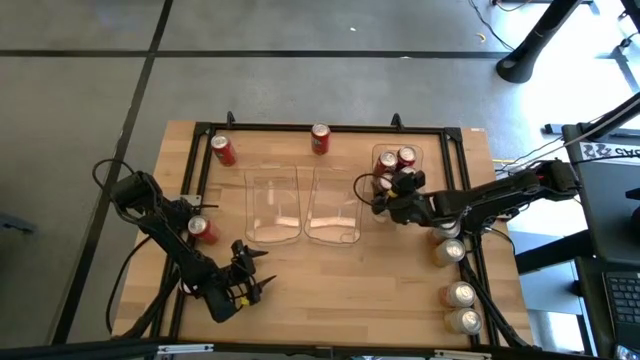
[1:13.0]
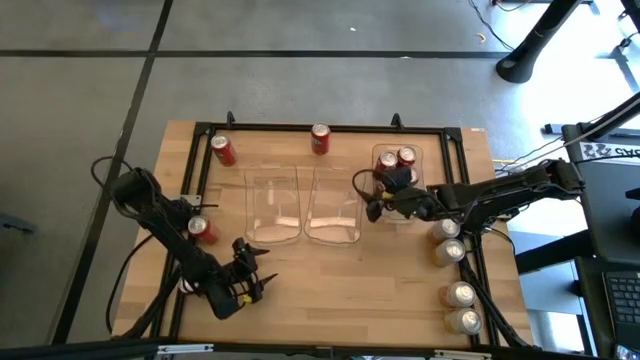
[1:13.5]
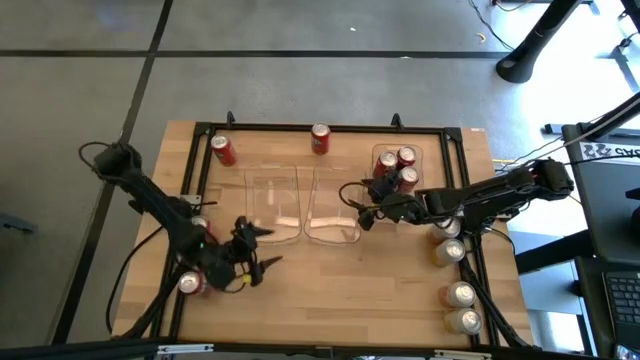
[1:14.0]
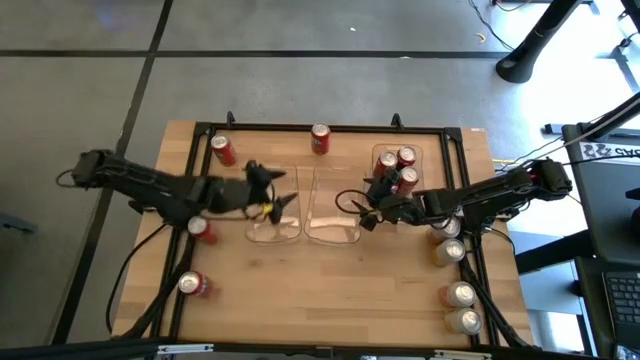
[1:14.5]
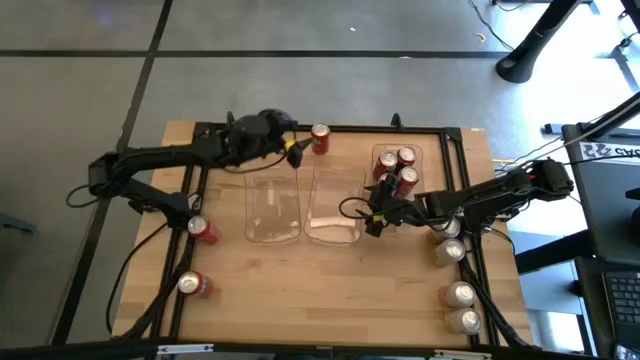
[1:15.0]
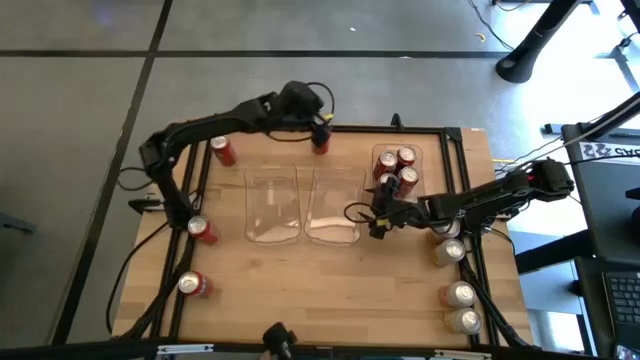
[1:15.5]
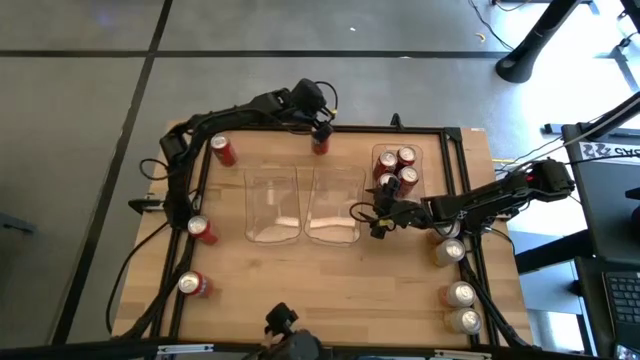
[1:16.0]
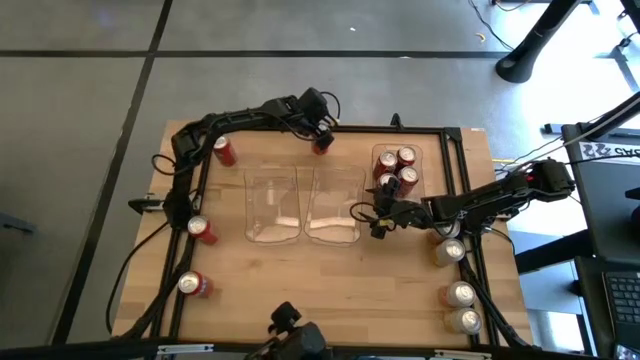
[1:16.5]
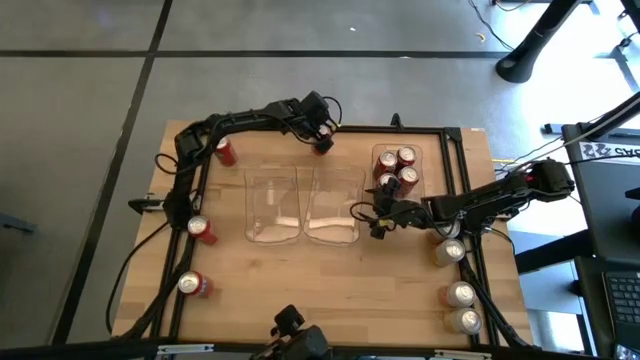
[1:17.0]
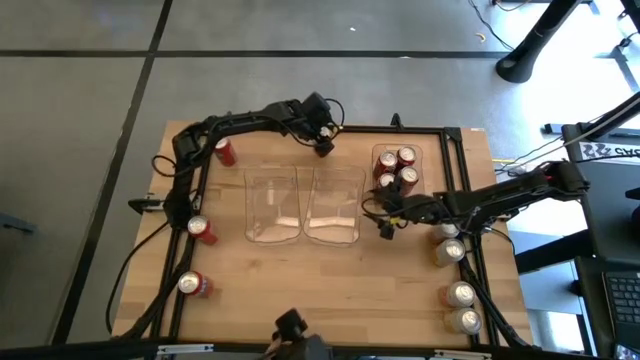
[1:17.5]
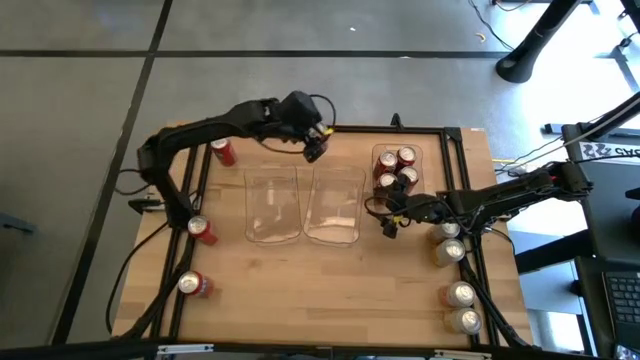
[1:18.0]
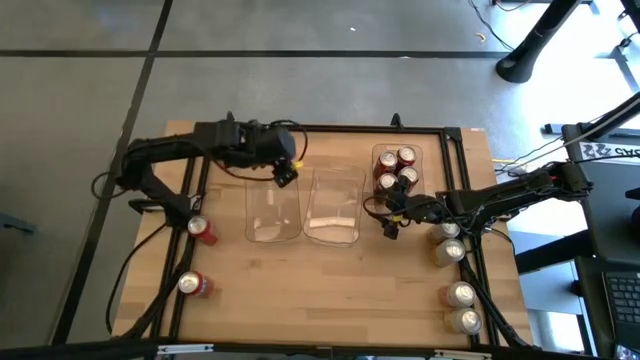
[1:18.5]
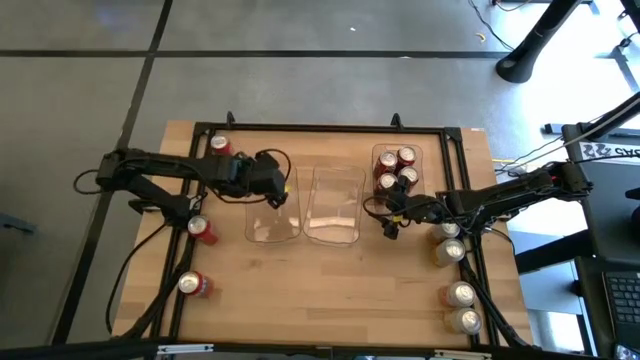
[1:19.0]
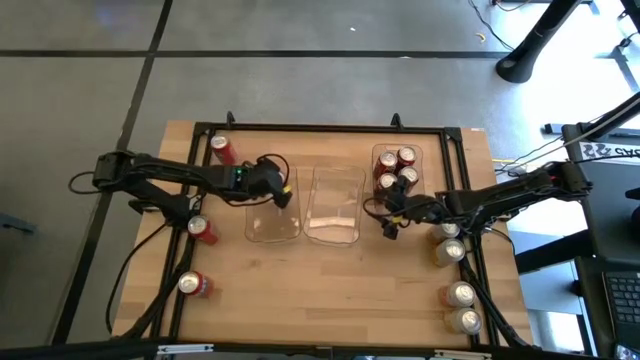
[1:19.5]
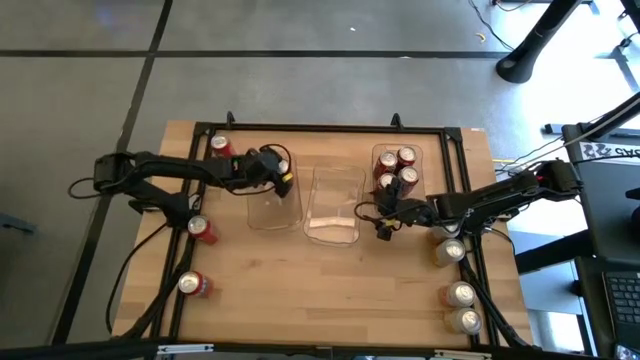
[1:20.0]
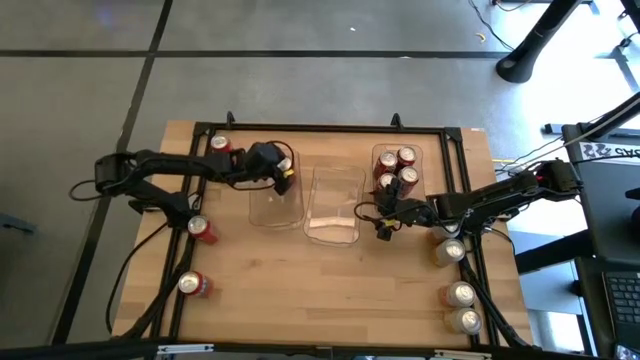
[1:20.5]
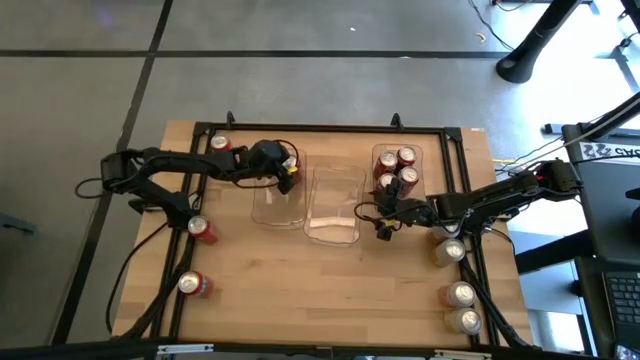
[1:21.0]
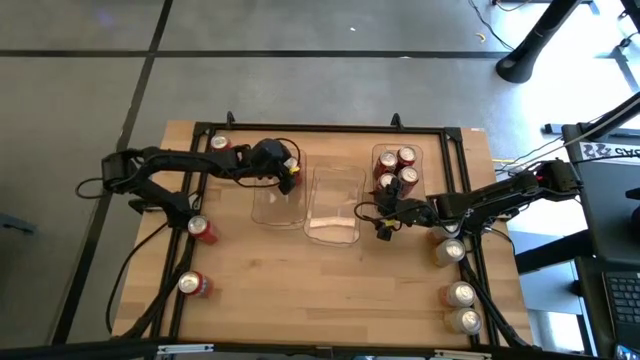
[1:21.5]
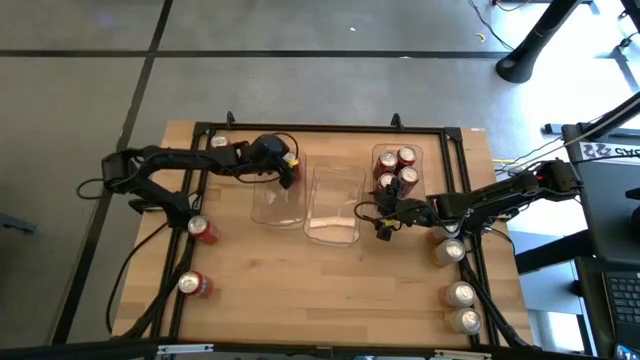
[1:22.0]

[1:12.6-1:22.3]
Task: Sort soda cans
Put the orange soda can into the left transparent bin

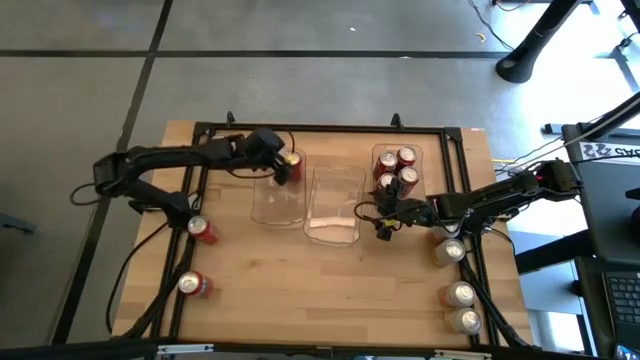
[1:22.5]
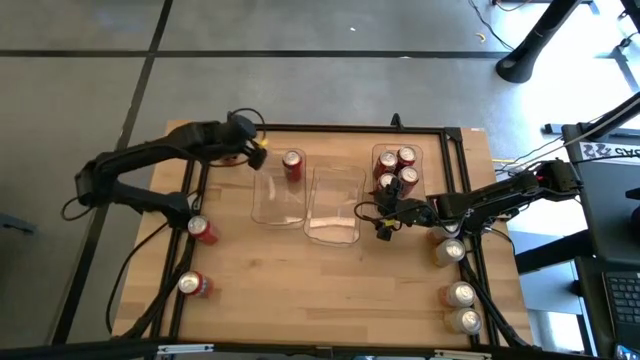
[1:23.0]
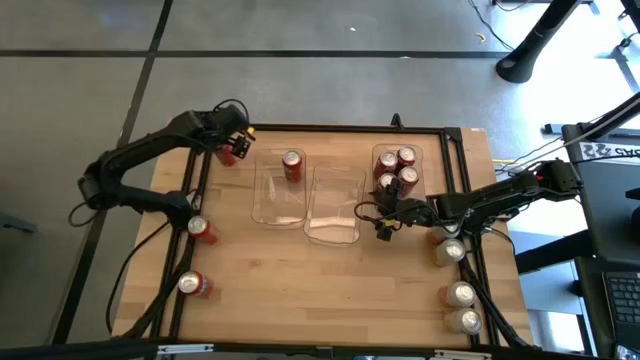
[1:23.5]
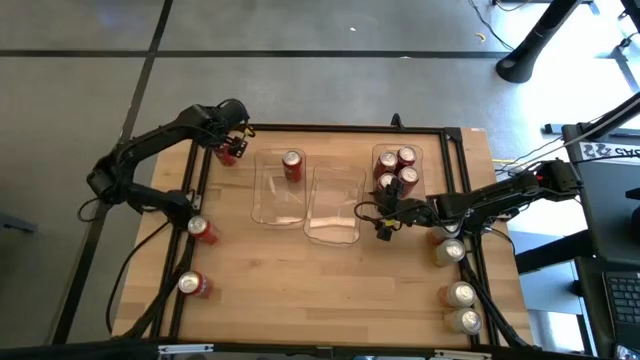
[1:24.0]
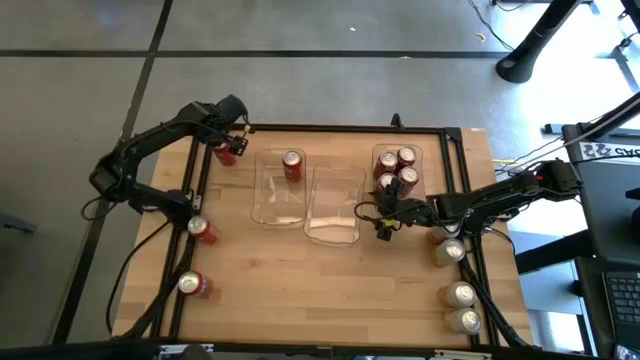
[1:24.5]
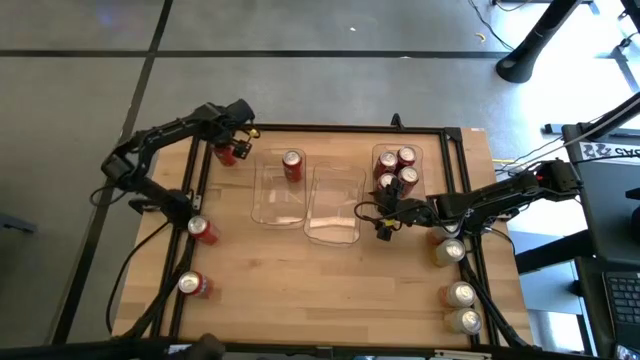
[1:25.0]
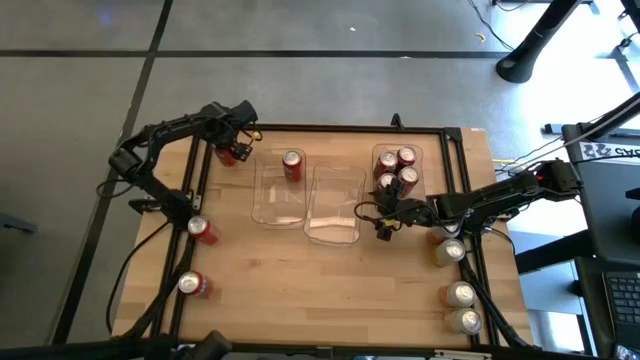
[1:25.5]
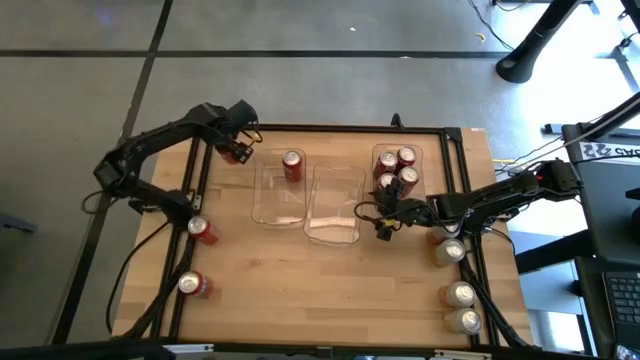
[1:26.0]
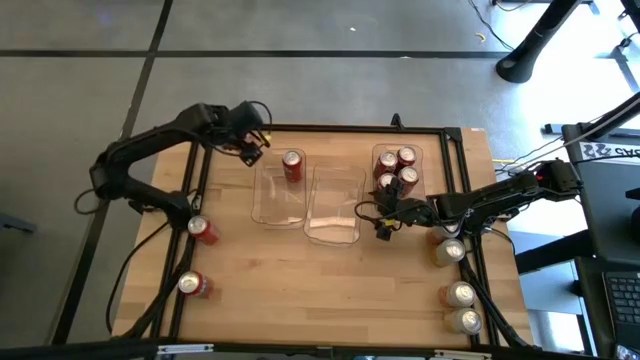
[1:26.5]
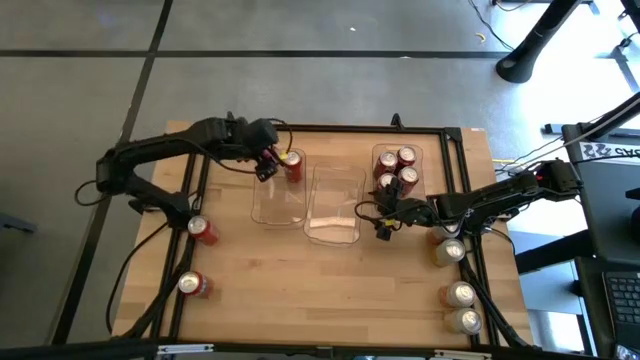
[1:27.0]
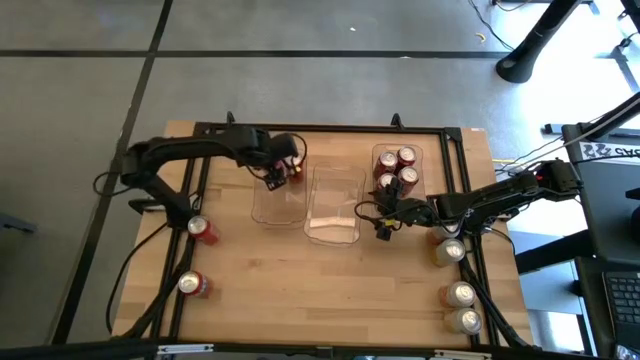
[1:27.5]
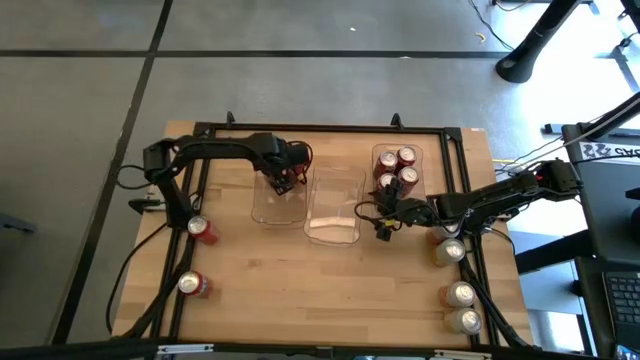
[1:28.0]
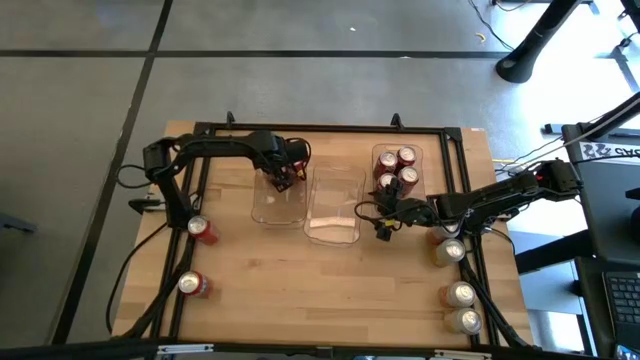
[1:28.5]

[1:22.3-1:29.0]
Put the orange soda can into the left transparent bin

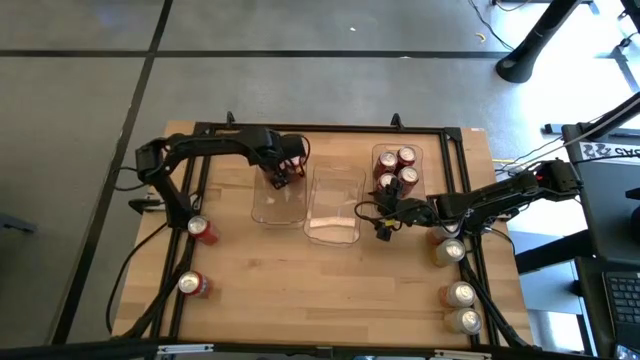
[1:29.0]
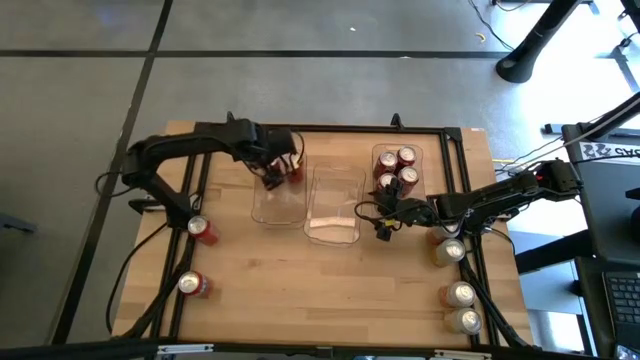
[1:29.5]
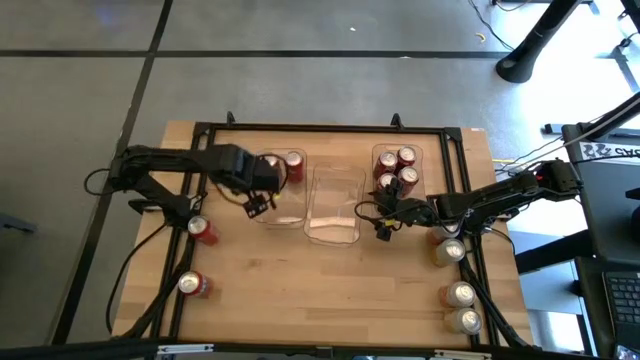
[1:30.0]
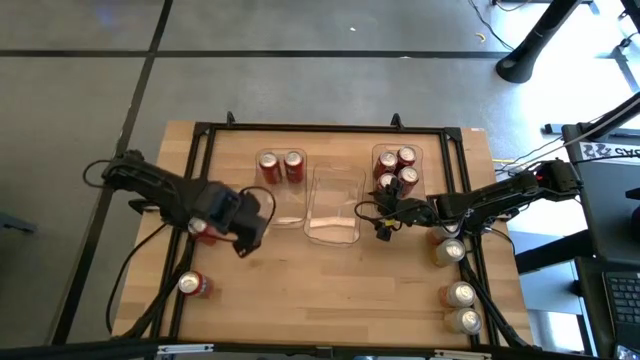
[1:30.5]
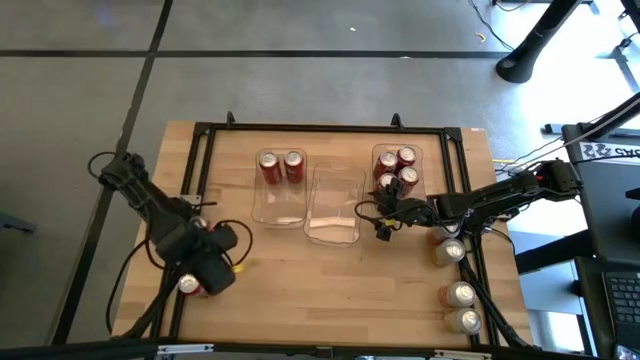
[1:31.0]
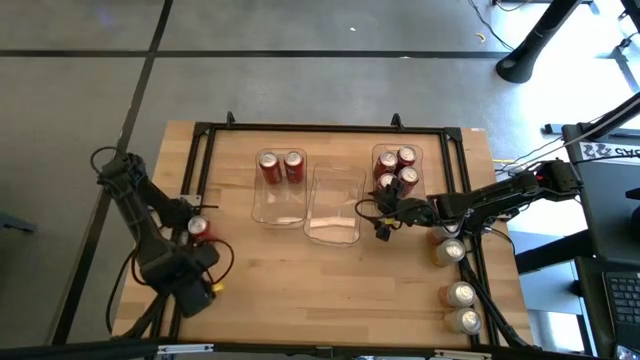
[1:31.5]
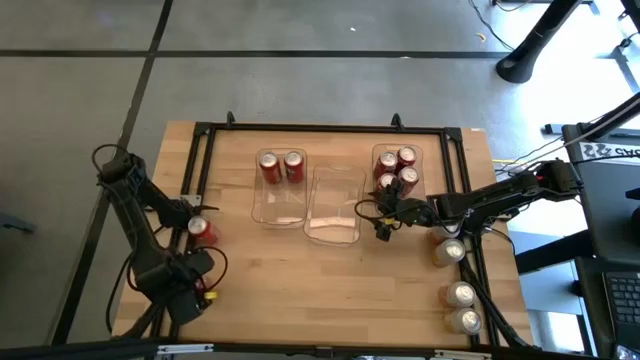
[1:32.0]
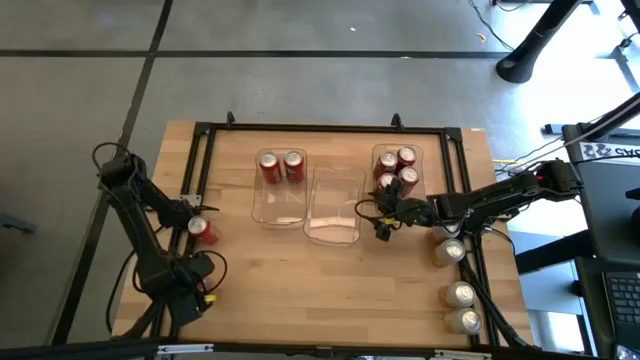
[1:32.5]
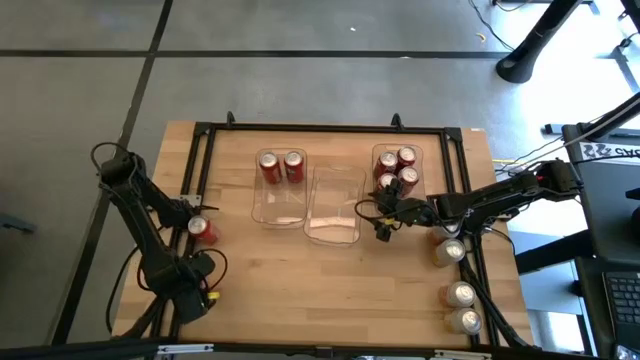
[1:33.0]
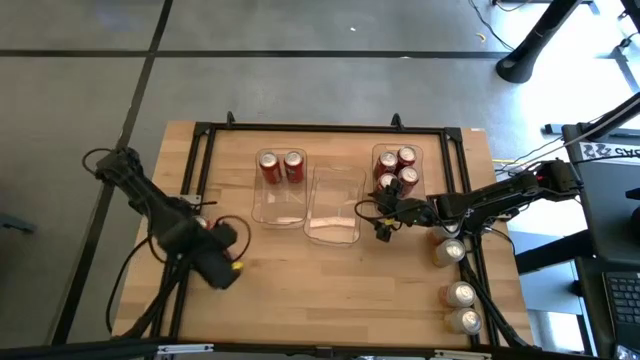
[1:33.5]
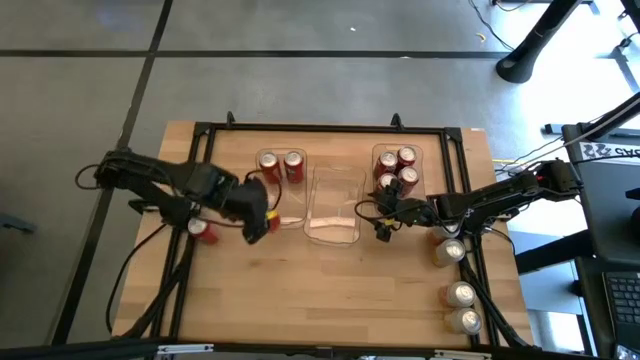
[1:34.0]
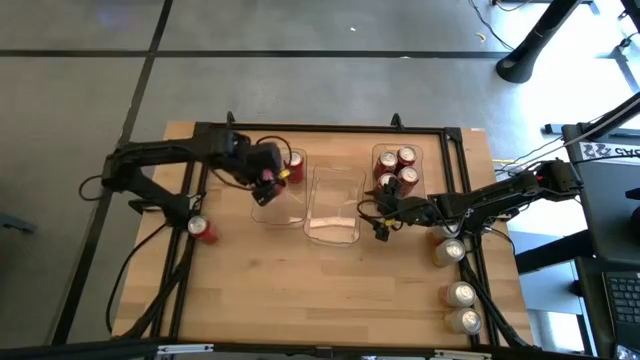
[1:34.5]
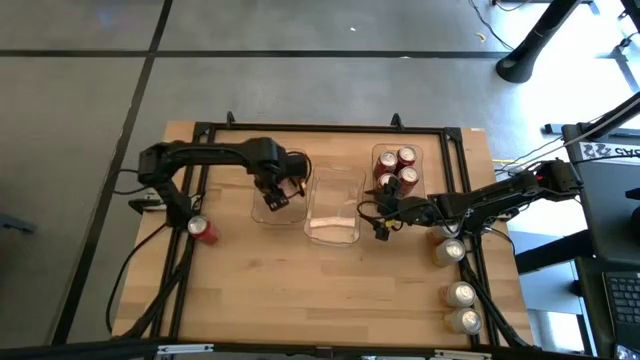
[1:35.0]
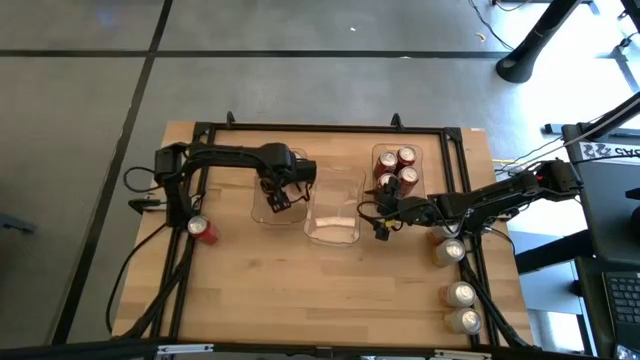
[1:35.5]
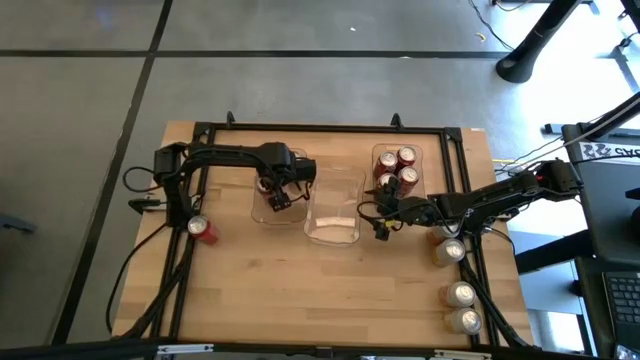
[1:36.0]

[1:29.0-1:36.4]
Put the orange soda can into the left transparent bin
